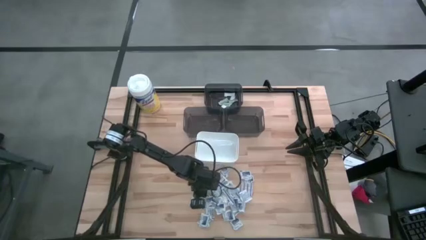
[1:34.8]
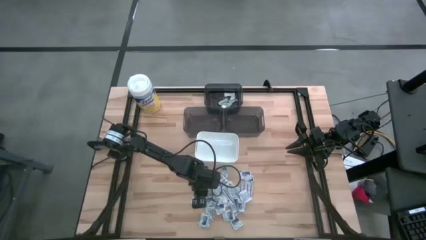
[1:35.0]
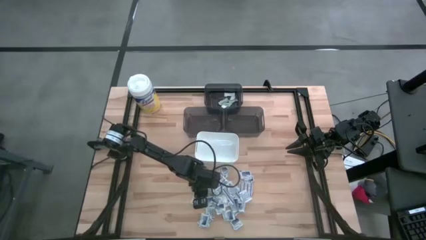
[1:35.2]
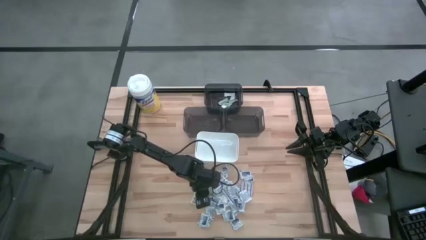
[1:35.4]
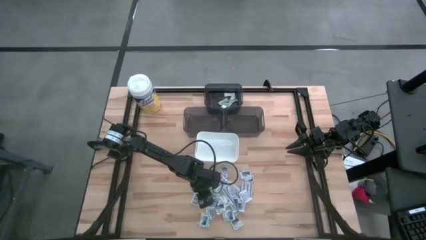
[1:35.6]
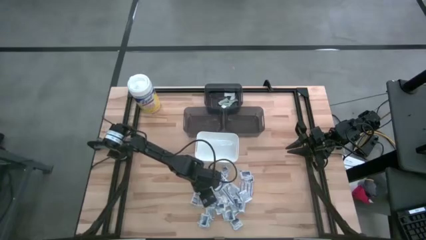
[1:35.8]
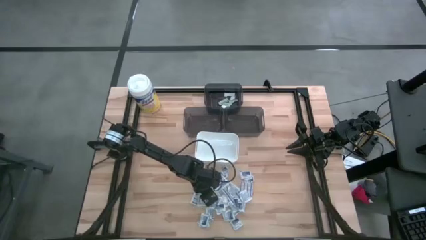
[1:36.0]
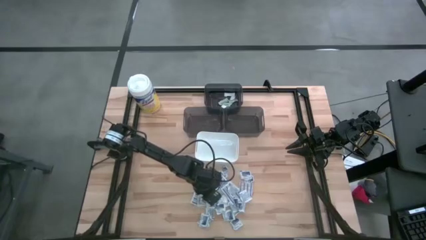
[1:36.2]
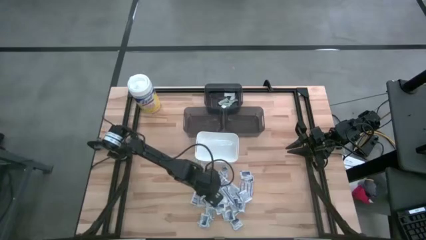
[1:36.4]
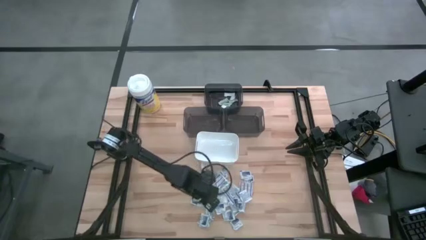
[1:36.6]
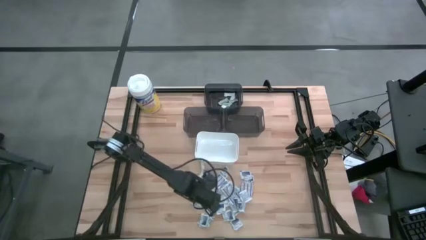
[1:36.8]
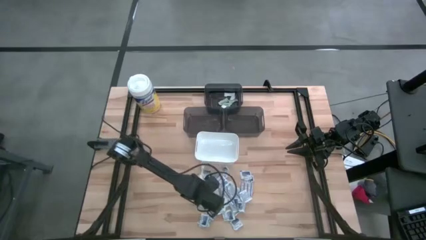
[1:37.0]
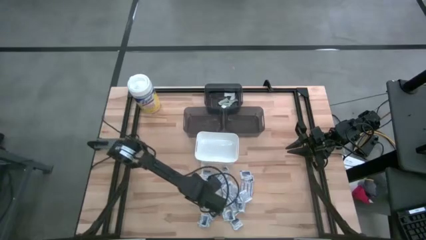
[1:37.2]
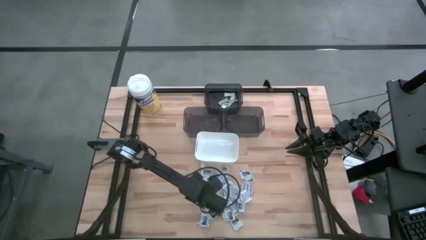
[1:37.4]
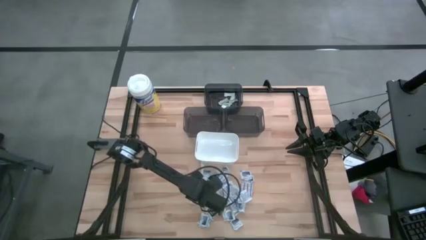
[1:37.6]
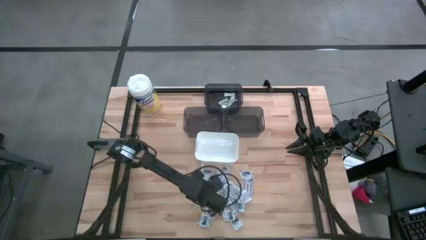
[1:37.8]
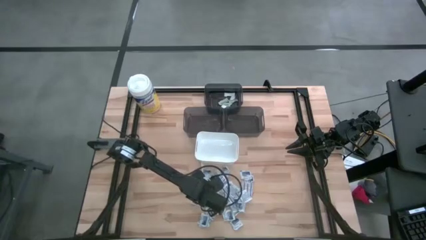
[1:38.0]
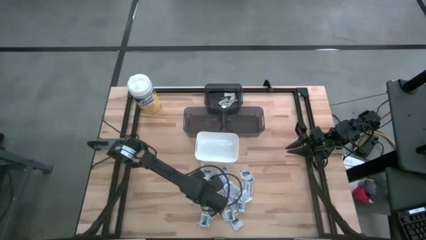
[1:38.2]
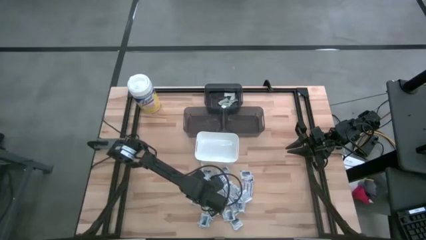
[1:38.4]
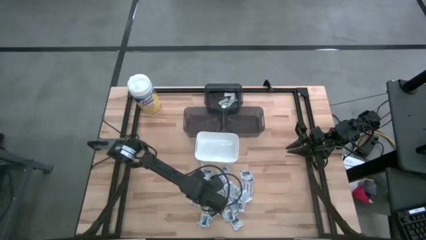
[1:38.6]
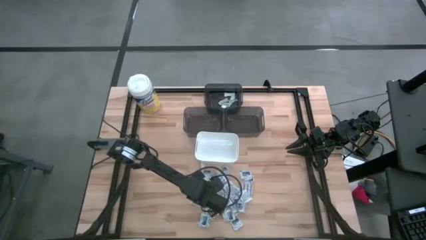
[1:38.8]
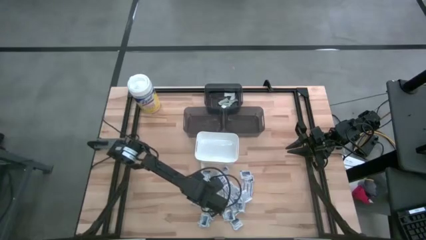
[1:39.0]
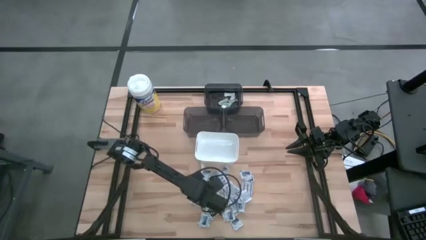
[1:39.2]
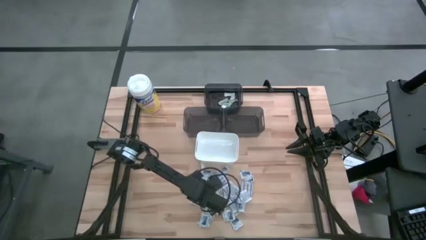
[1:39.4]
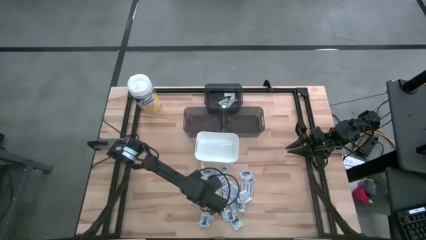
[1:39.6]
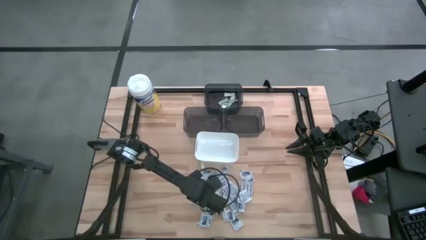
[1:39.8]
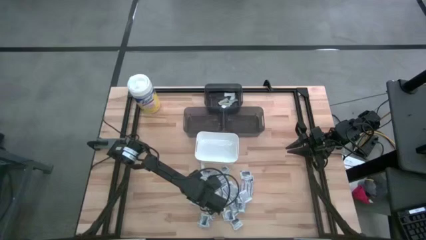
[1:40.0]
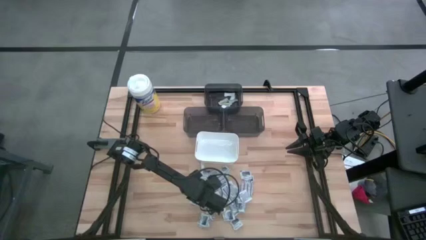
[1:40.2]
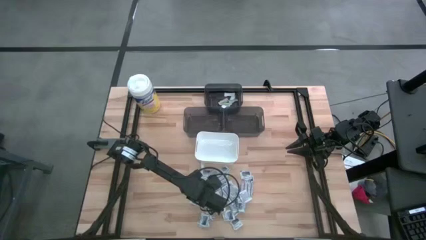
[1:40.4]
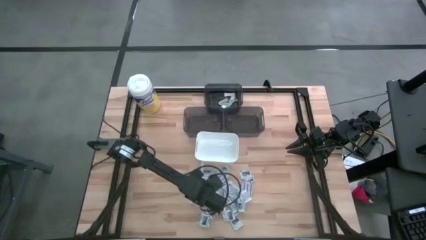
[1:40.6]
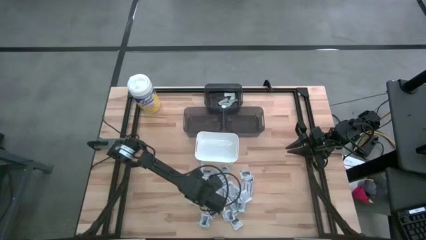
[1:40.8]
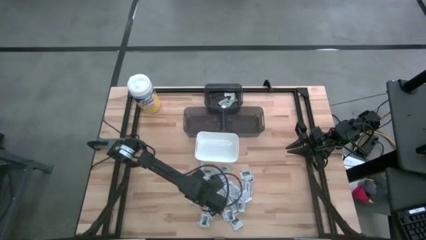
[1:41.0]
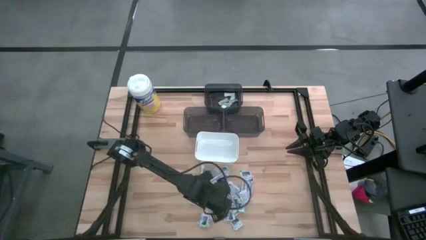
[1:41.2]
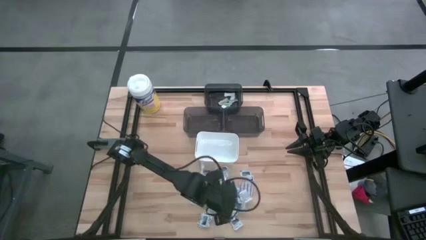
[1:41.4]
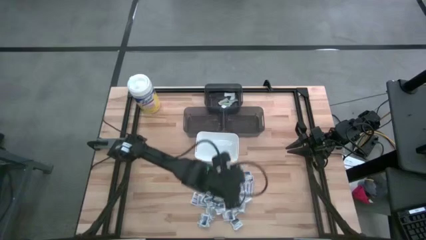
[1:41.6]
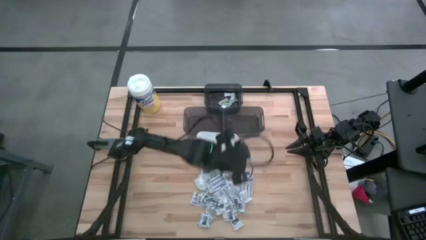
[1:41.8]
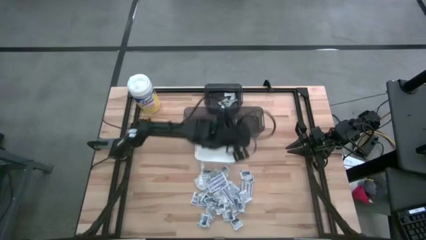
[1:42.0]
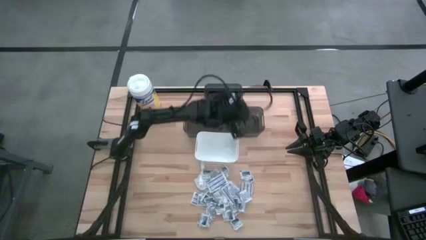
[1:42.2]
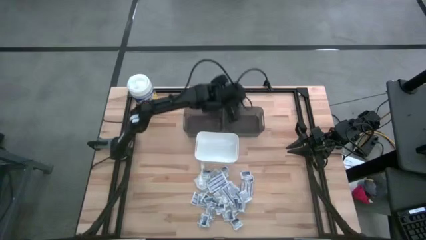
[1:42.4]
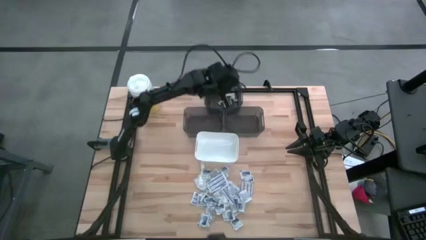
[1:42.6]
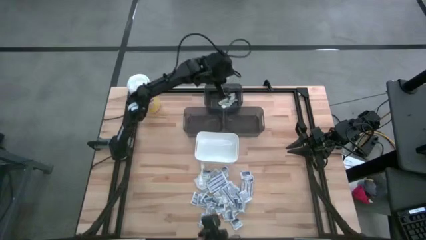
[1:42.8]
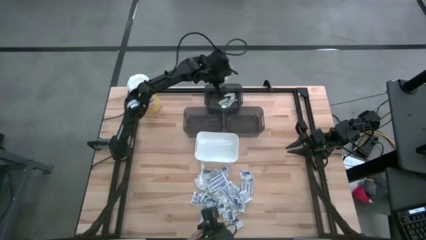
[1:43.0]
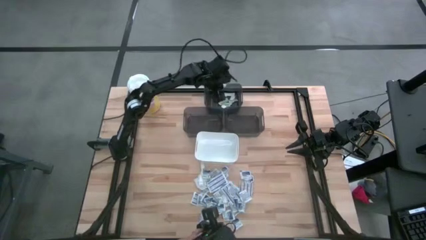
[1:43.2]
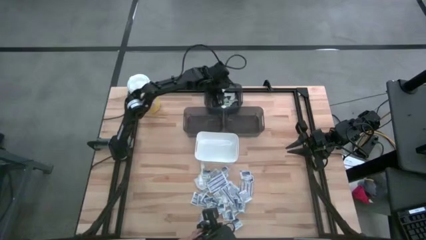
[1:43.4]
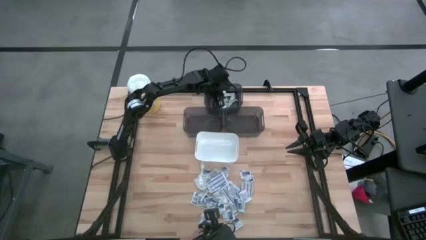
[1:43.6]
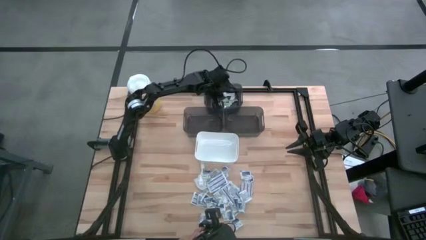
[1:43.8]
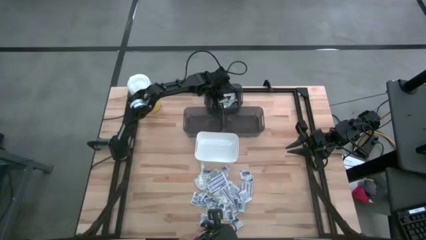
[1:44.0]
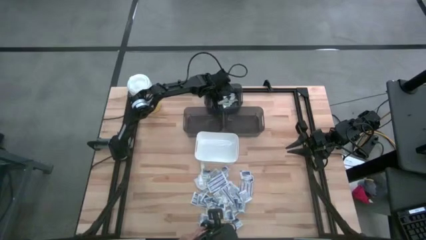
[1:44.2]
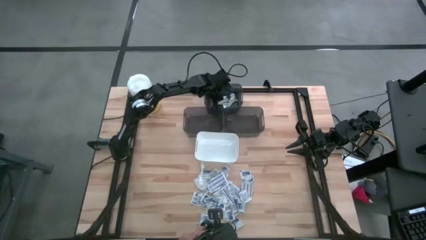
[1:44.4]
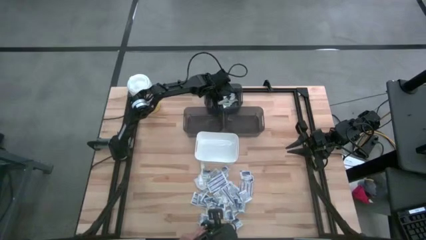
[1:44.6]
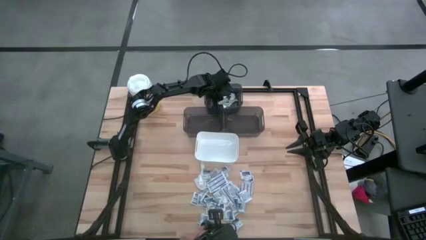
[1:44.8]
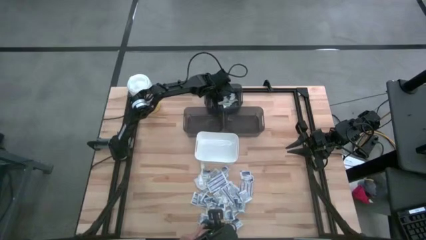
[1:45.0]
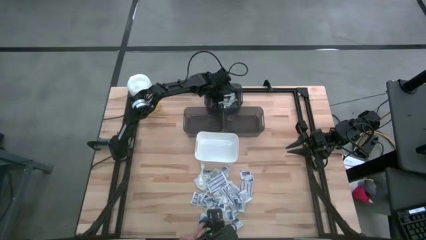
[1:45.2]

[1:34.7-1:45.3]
Task: Pick & Place First Aid Supplies
Put the green bandage into the top black bin

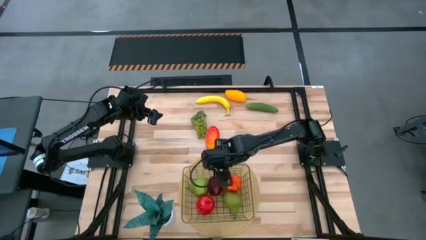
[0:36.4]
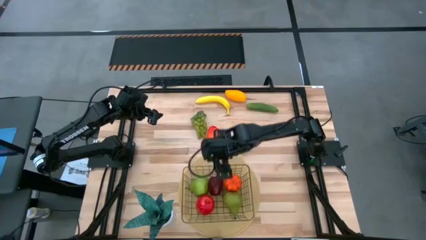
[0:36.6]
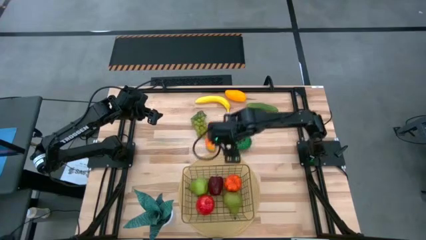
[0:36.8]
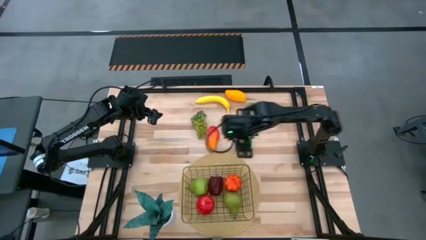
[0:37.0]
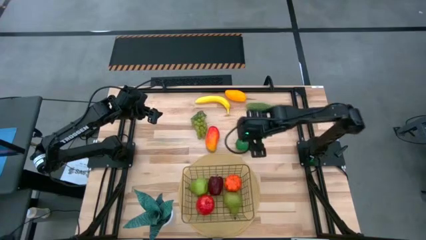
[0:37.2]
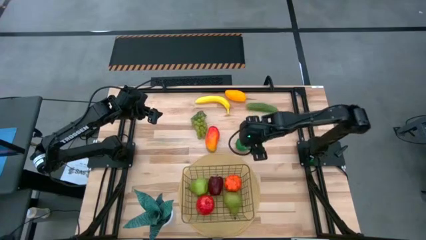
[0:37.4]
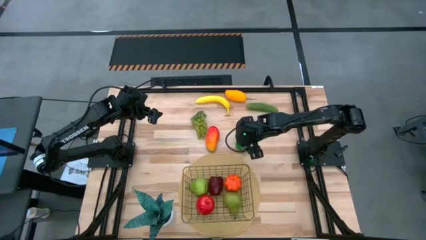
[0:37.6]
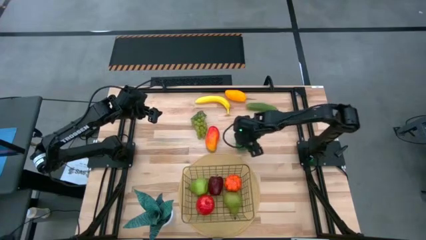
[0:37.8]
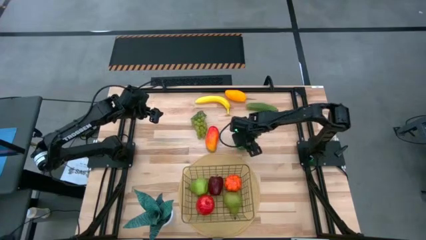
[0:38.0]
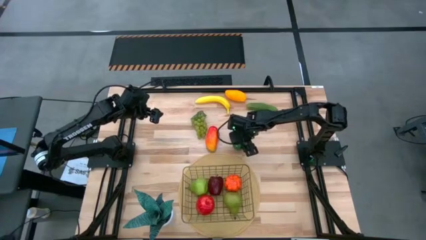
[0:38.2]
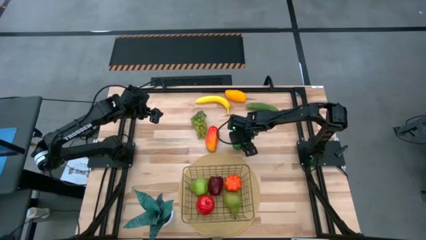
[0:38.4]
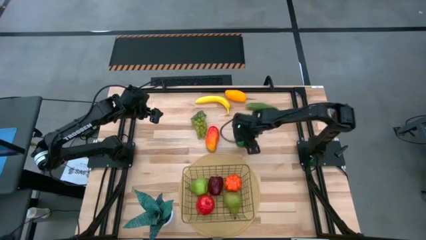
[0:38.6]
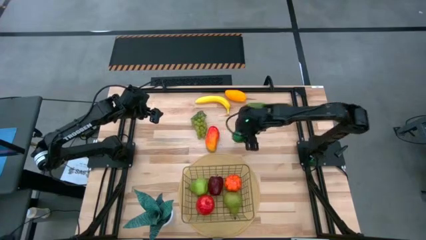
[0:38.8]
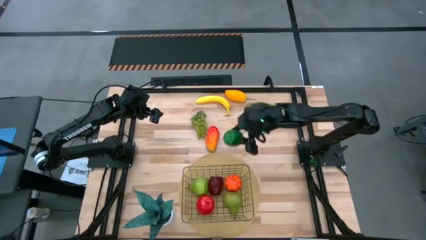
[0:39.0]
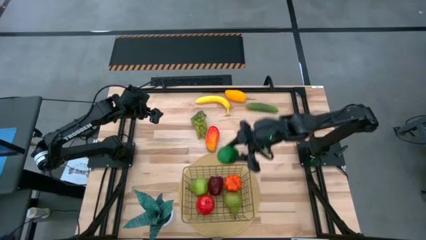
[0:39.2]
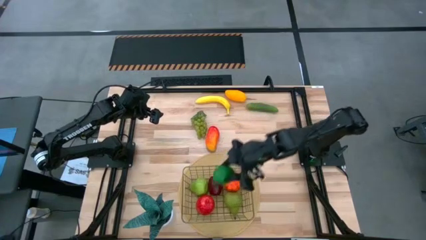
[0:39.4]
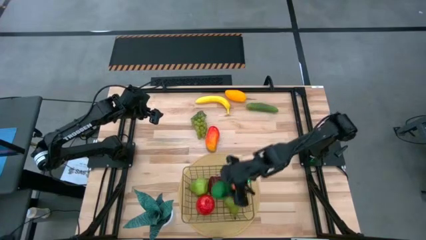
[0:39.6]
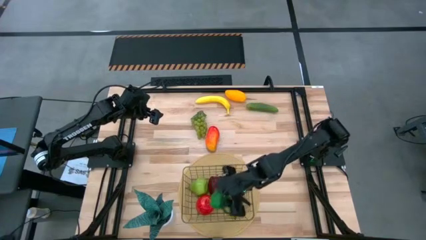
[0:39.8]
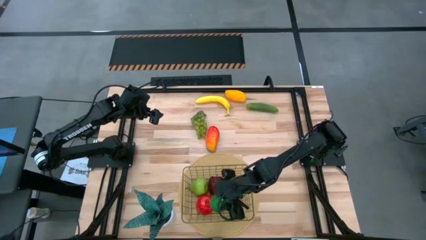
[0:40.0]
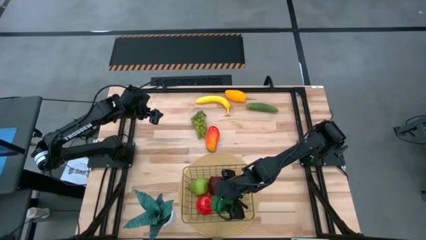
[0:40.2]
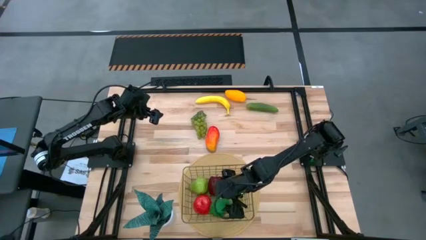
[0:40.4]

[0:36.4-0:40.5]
Task: Build produce basket
Put the green lemon into the wire basket

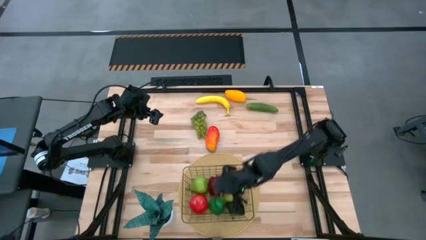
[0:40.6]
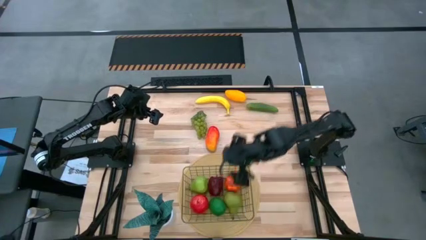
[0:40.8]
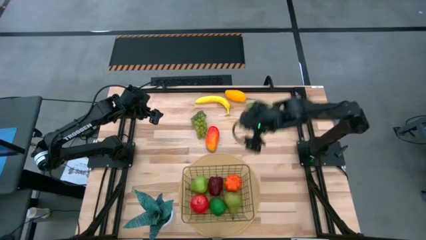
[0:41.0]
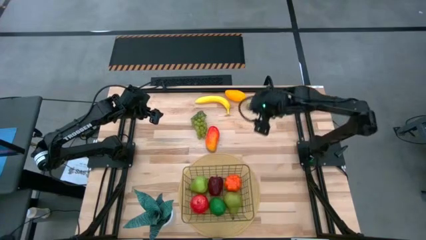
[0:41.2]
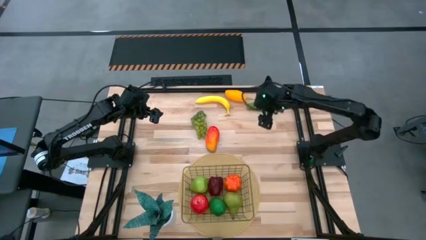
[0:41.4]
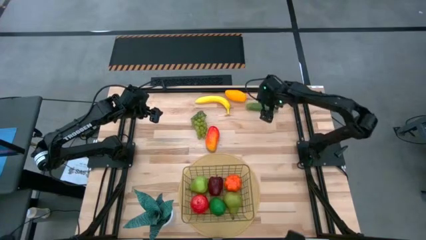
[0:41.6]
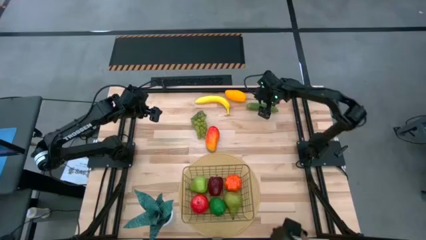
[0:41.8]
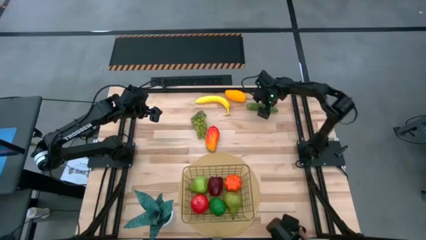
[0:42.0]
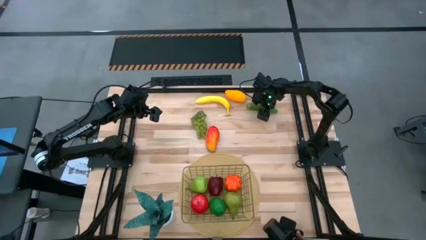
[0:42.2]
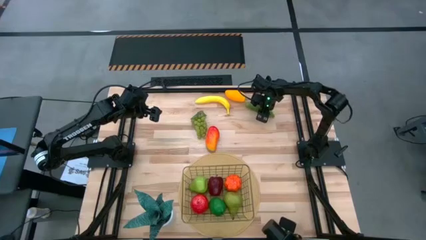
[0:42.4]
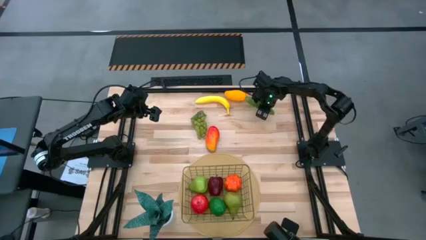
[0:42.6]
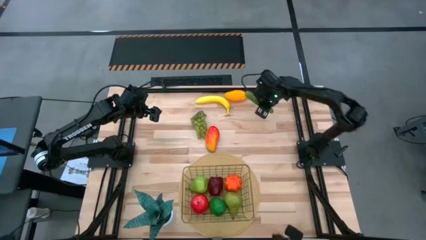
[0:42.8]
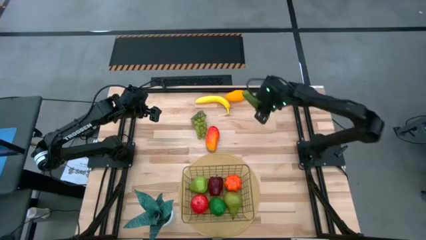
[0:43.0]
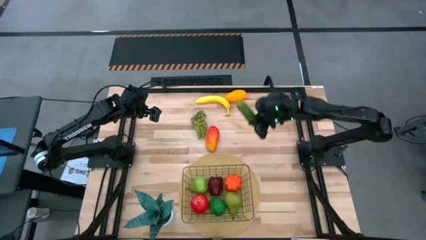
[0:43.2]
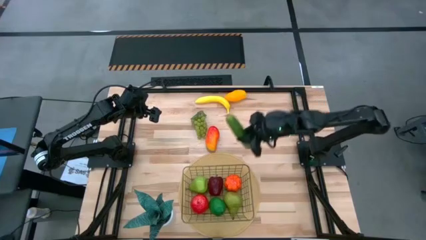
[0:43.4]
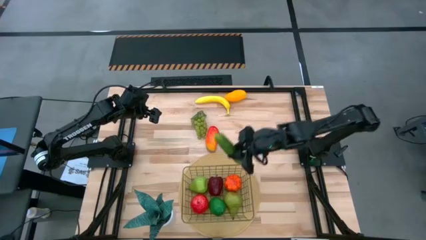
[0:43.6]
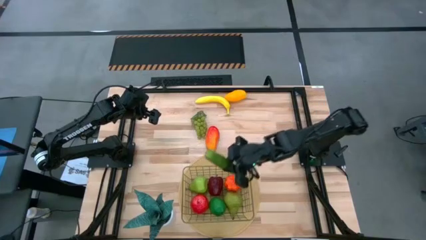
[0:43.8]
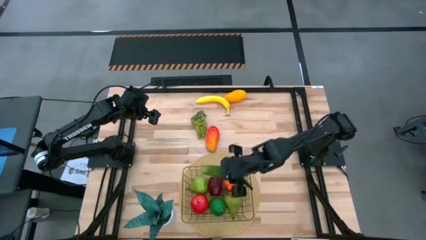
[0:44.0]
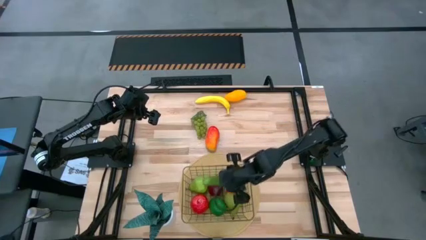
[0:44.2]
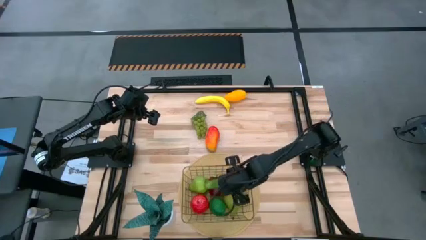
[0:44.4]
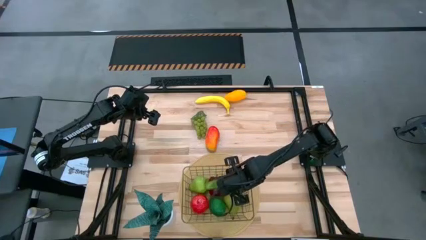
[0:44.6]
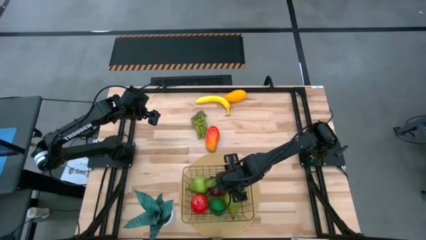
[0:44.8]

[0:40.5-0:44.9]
Put the cucumber into the wire basket
